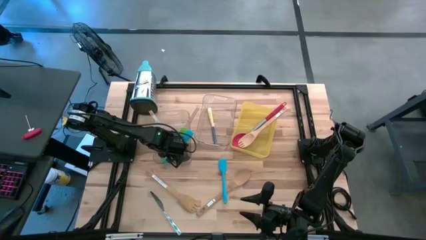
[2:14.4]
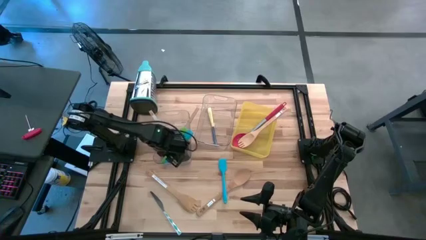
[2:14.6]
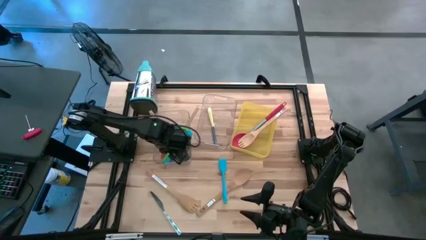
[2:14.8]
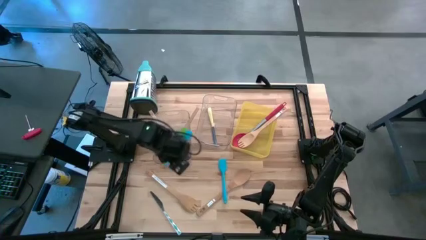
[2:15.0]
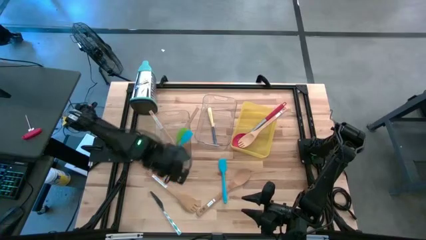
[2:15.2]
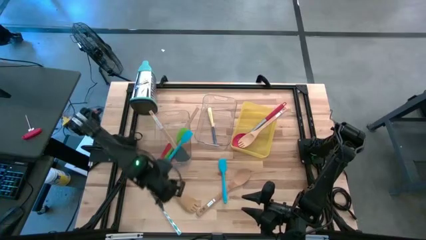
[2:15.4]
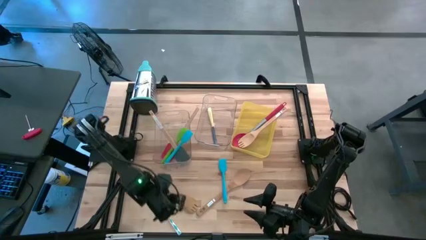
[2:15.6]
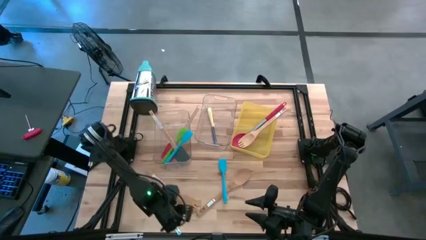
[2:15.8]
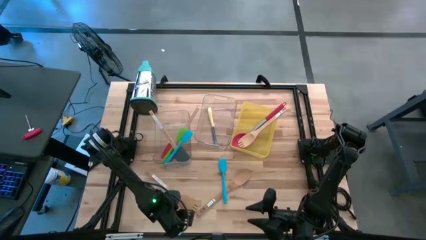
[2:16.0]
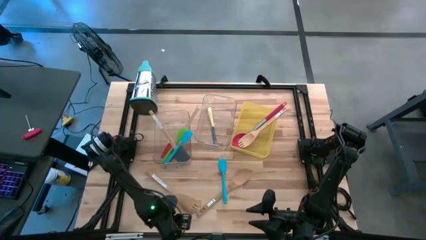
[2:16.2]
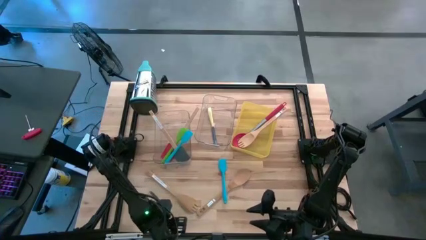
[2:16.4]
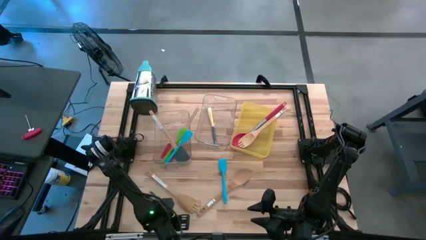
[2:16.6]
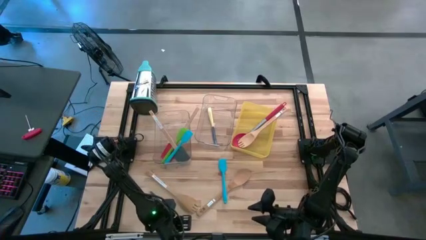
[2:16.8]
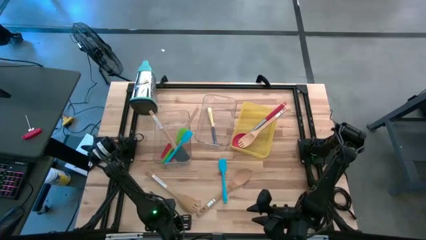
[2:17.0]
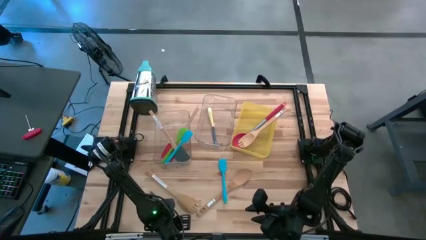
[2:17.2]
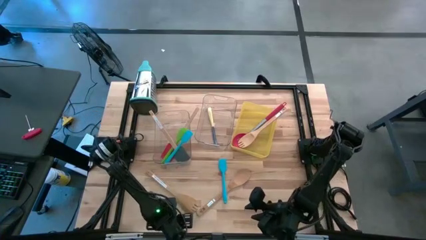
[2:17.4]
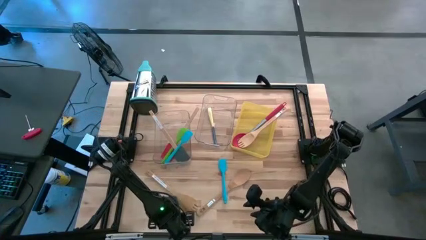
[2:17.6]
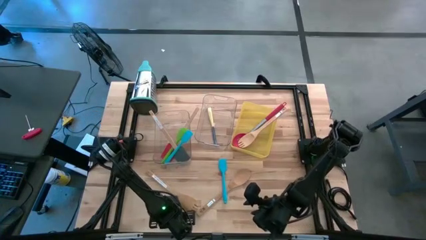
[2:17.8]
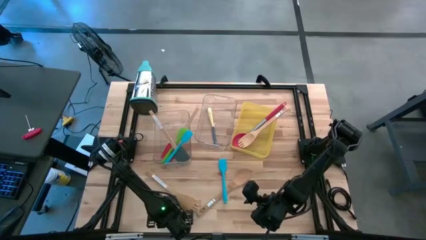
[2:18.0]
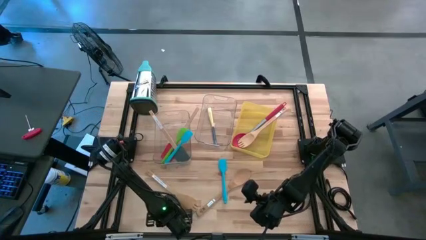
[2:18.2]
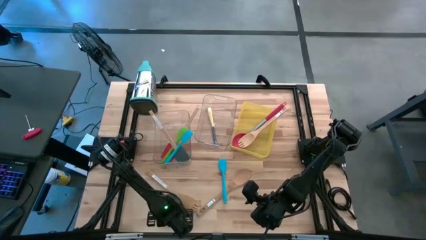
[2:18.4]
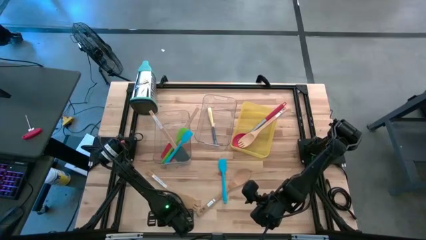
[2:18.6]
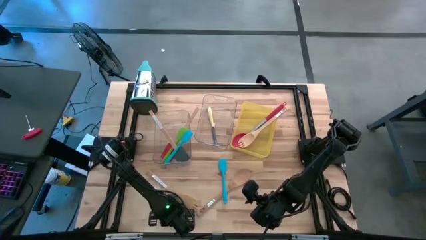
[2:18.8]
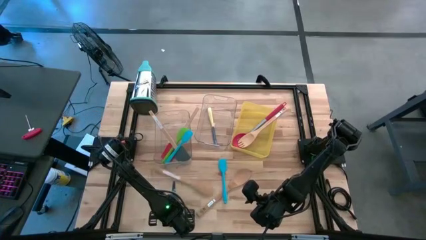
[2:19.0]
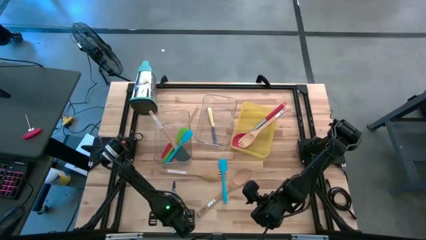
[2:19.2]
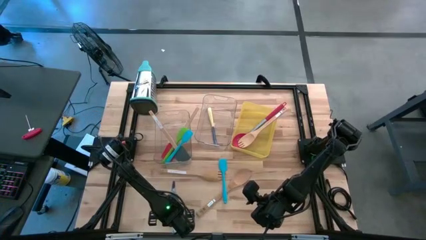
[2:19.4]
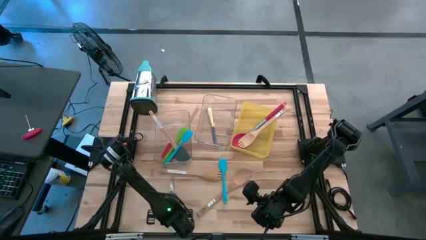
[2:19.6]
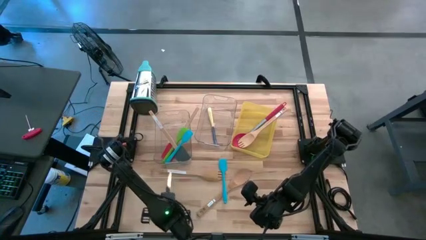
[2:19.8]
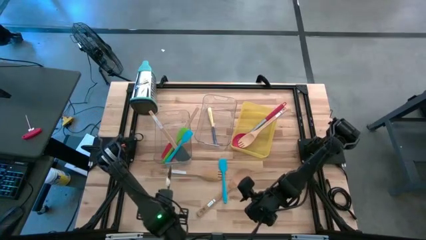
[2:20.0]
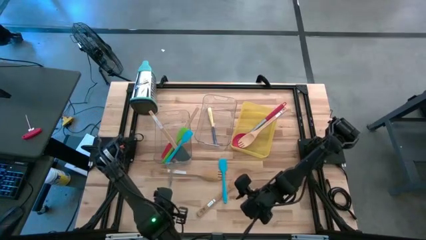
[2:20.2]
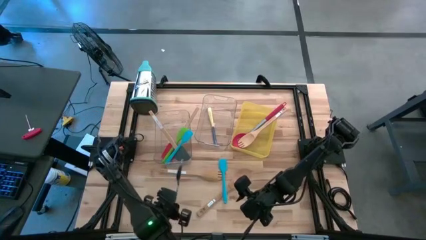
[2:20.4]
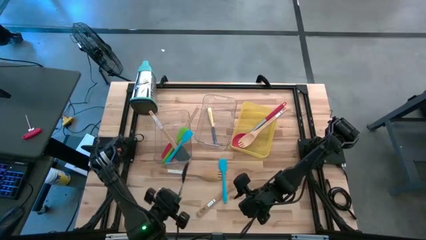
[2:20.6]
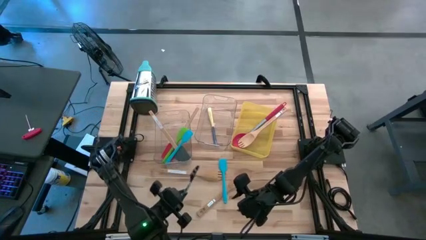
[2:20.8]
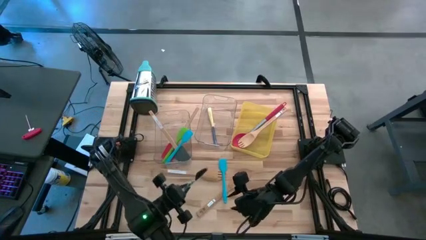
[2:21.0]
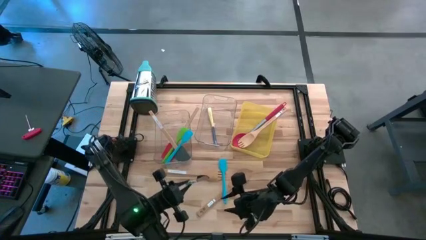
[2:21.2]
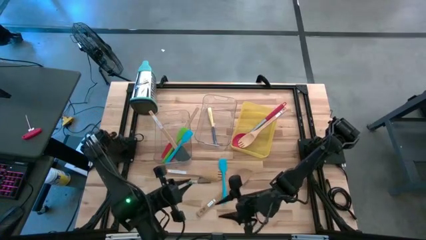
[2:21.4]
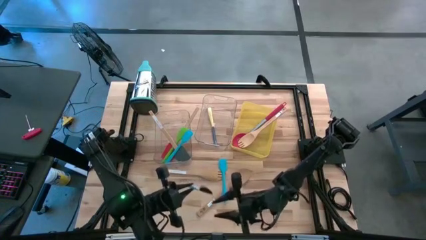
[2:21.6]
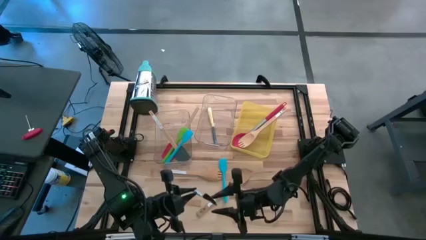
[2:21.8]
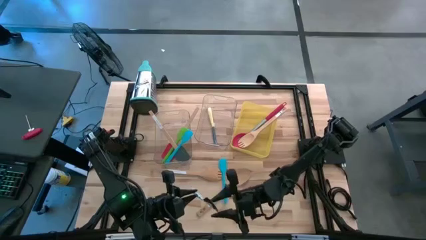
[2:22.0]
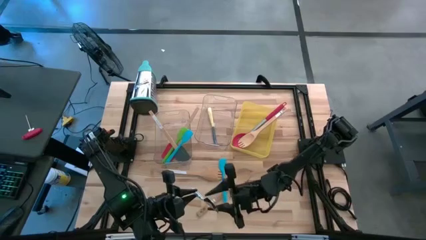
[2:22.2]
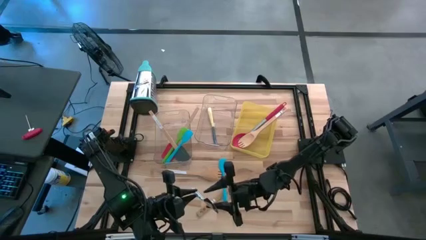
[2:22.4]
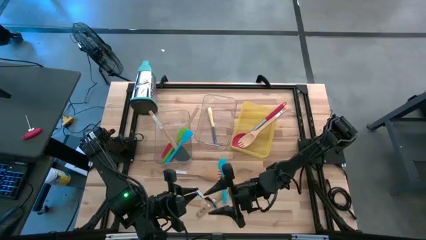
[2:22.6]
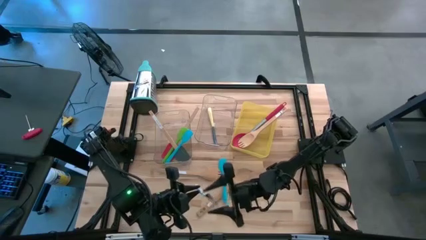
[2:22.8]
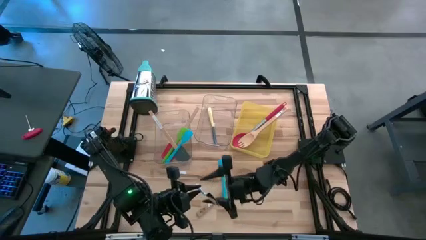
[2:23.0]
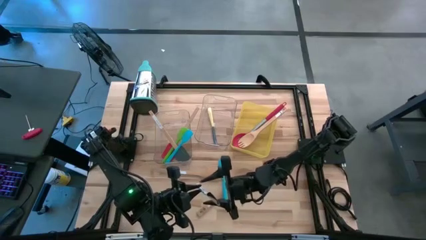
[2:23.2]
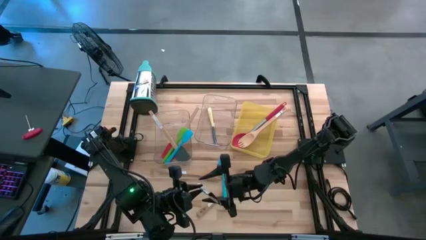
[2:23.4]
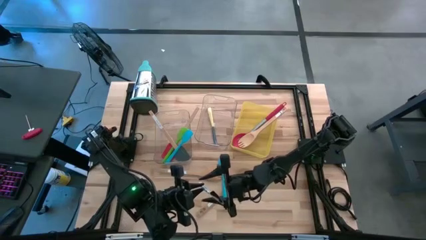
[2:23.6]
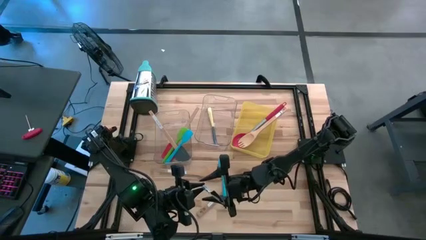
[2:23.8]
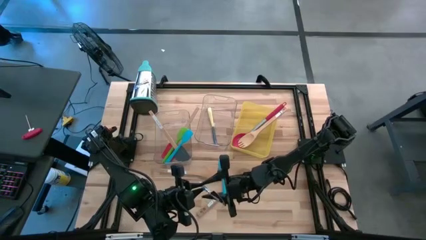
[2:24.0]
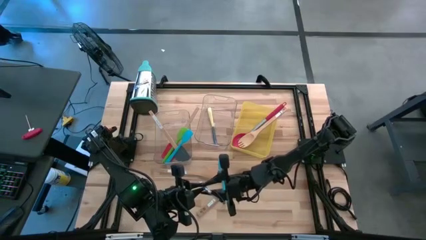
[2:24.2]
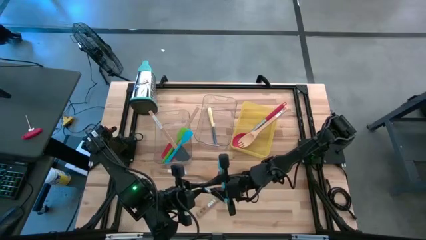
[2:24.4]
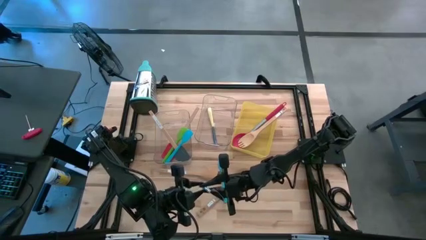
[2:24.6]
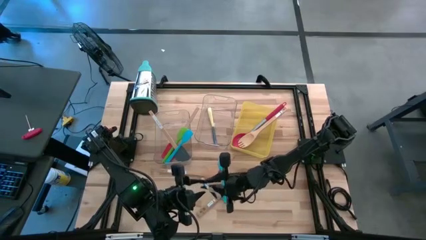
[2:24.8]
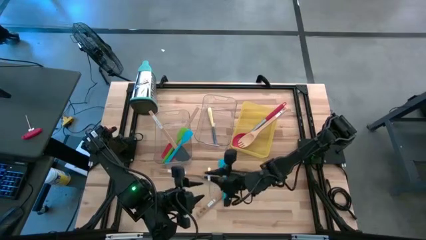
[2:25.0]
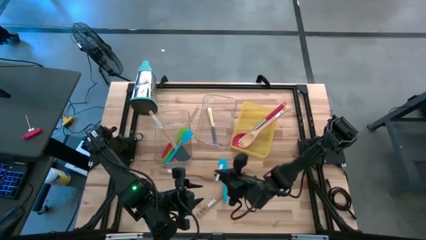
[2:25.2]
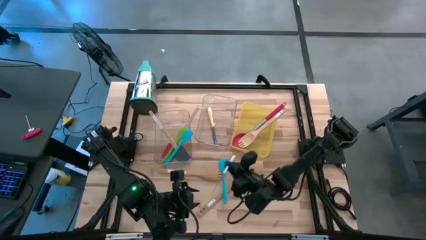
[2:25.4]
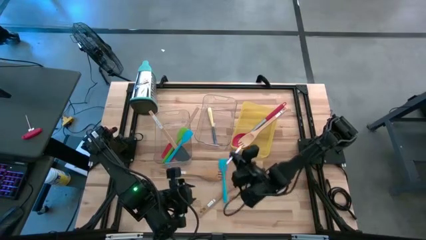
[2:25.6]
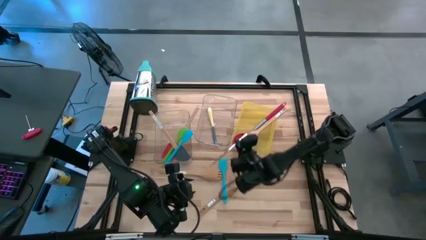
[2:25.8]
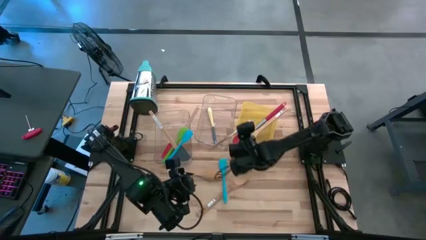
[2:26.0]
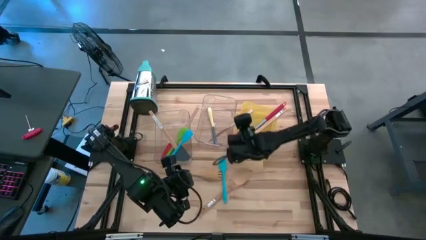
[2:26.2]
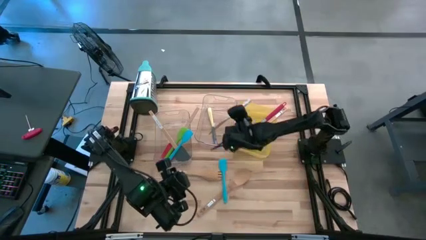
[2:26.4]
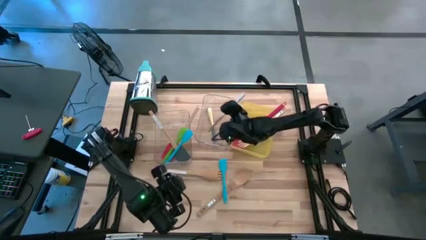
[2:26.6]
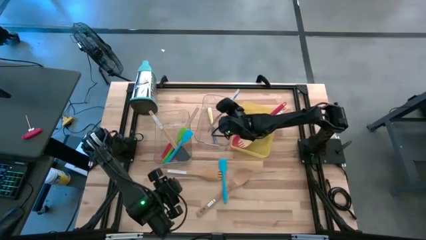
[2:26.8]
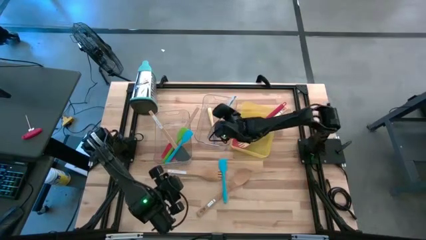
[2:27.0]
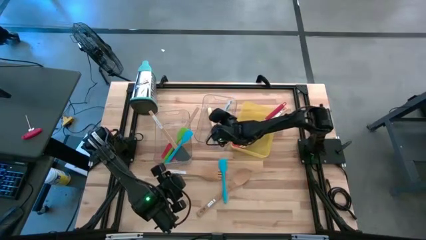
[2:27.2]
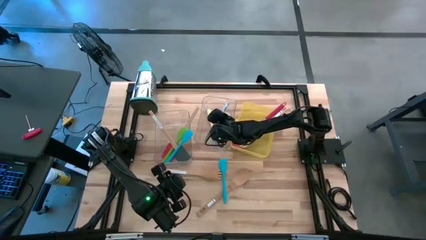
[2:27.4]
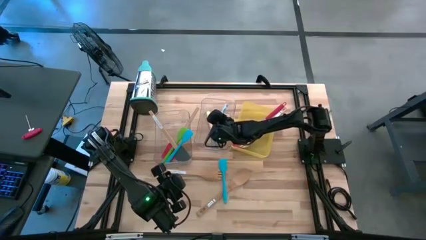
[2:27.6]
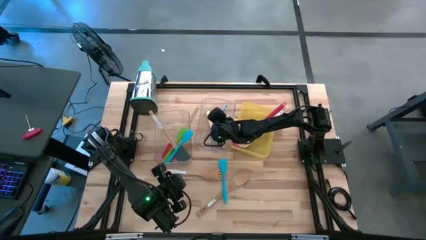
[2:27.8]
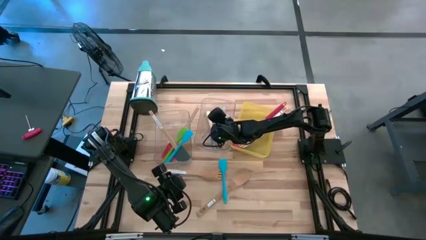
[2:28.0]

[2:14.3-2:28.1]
Task: Pick & Place Kitchen Items
Put the blue knife into the right transparent bin
